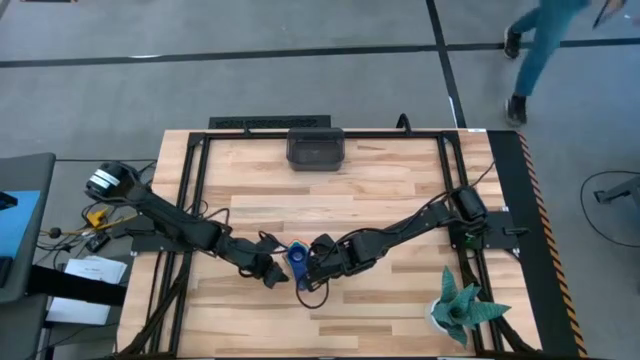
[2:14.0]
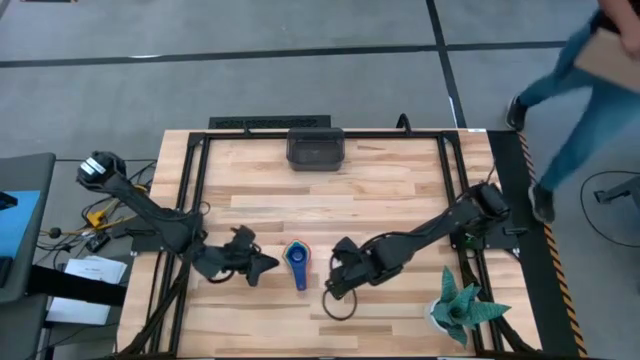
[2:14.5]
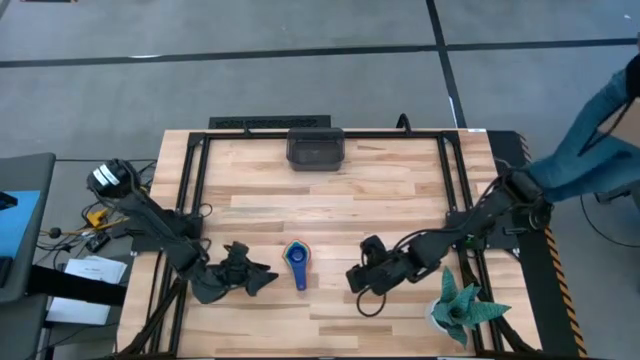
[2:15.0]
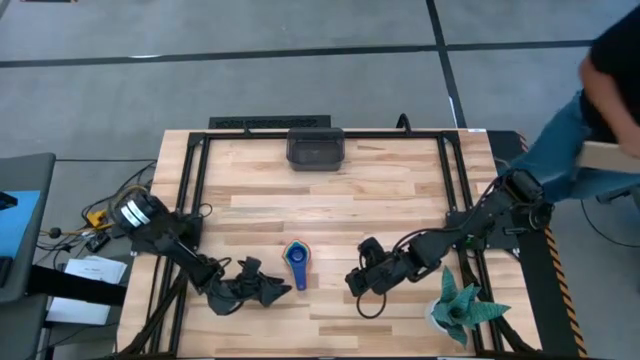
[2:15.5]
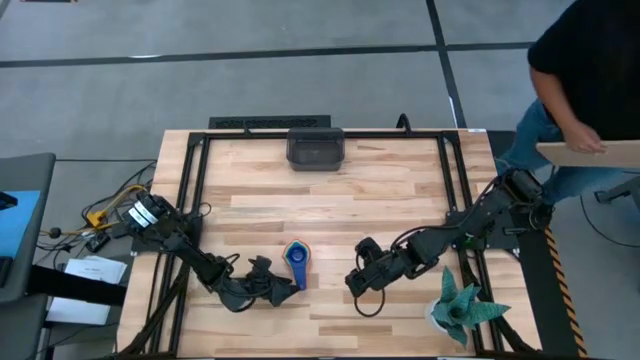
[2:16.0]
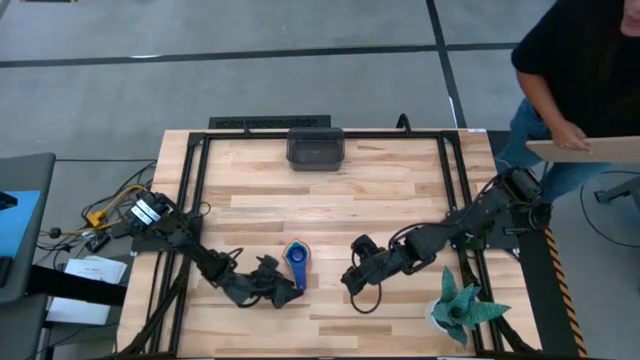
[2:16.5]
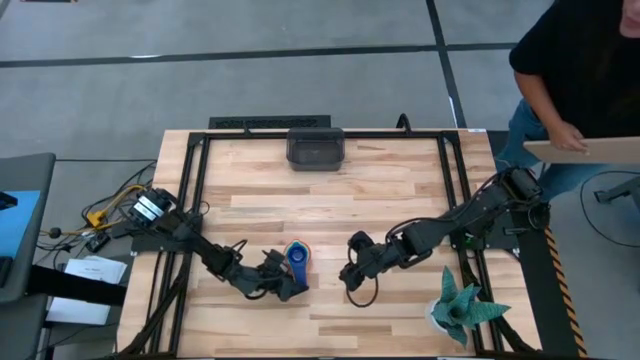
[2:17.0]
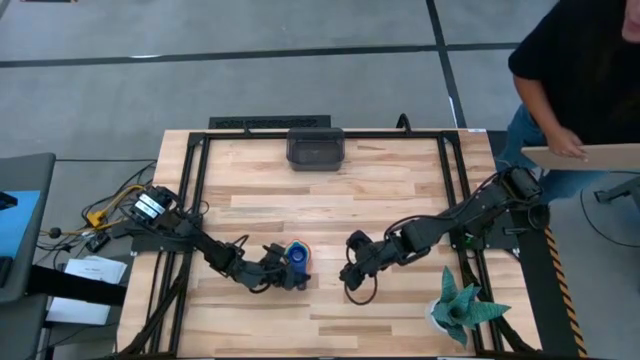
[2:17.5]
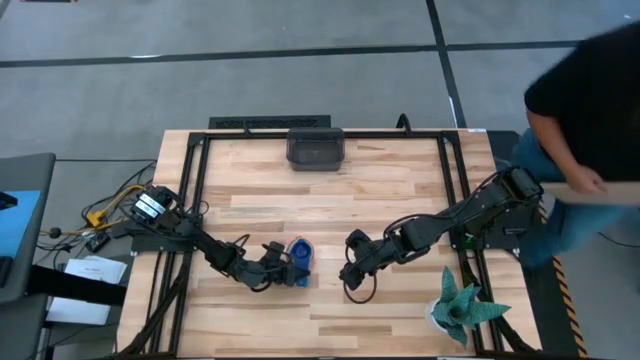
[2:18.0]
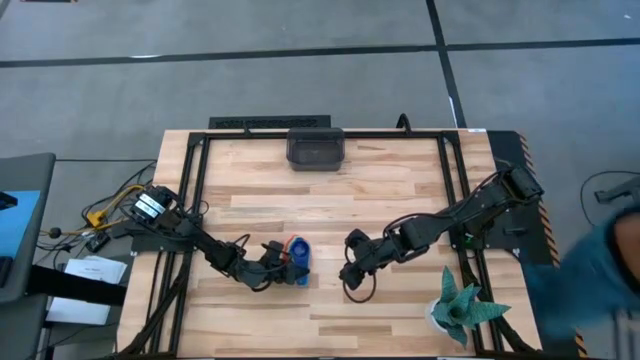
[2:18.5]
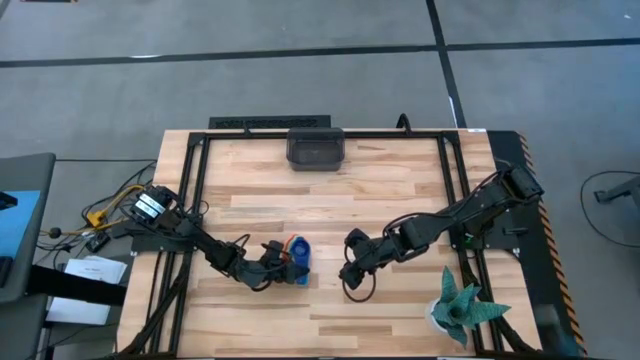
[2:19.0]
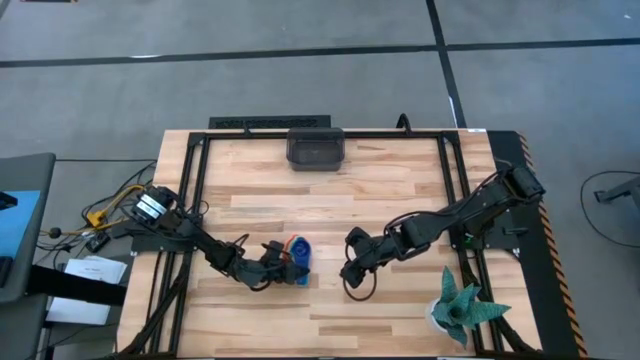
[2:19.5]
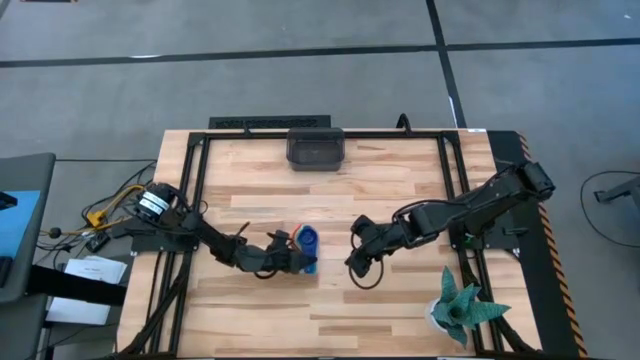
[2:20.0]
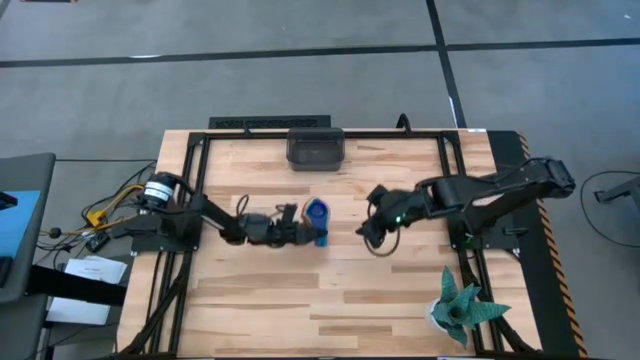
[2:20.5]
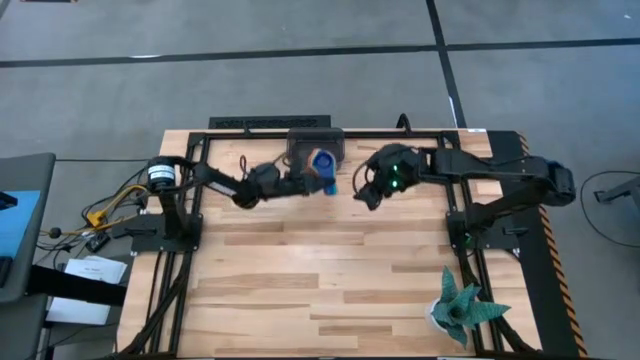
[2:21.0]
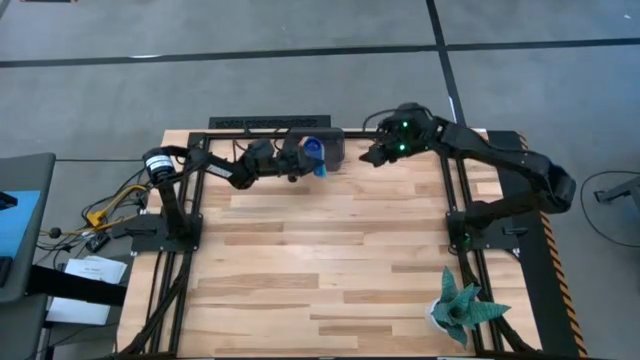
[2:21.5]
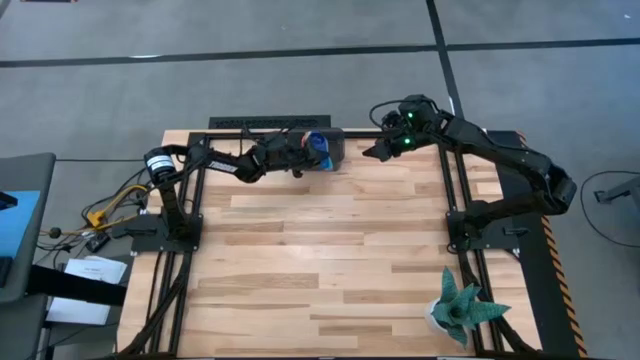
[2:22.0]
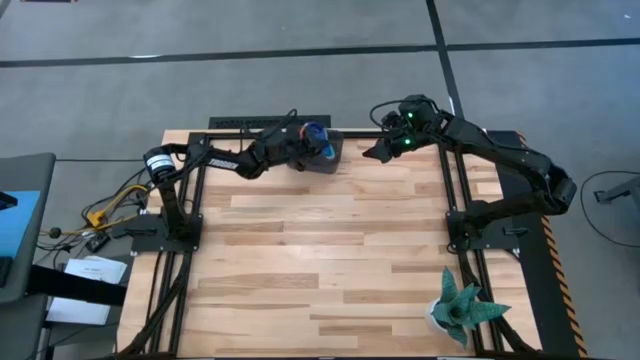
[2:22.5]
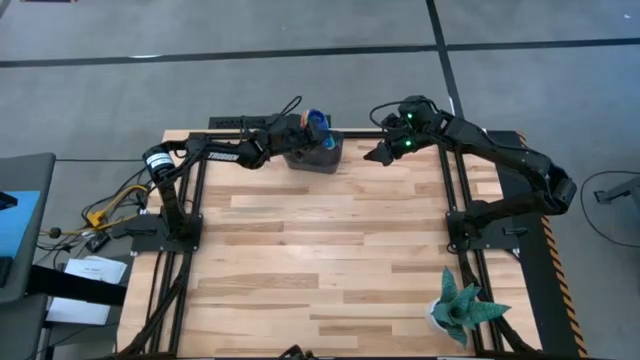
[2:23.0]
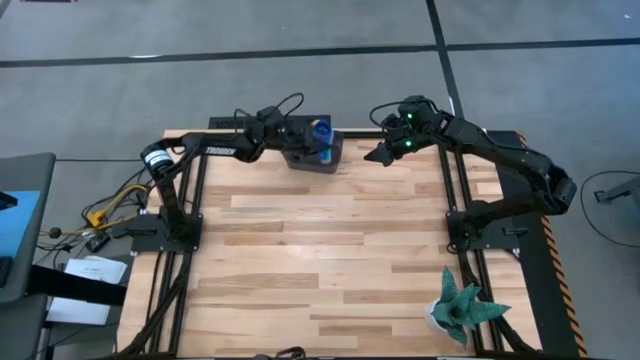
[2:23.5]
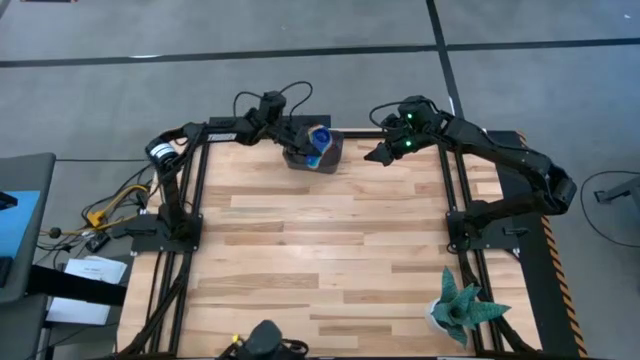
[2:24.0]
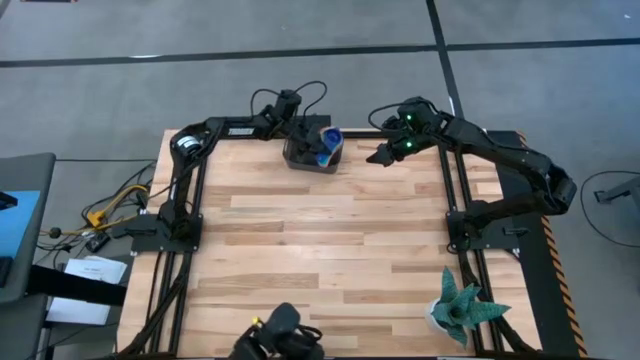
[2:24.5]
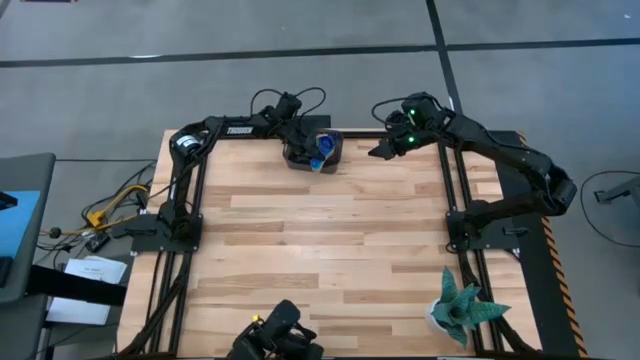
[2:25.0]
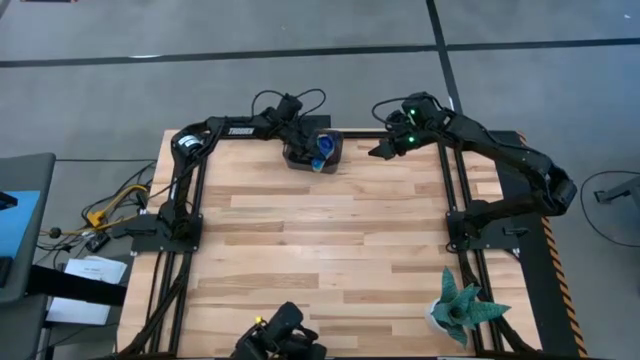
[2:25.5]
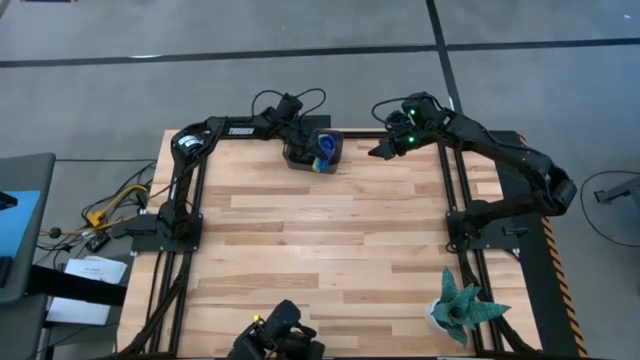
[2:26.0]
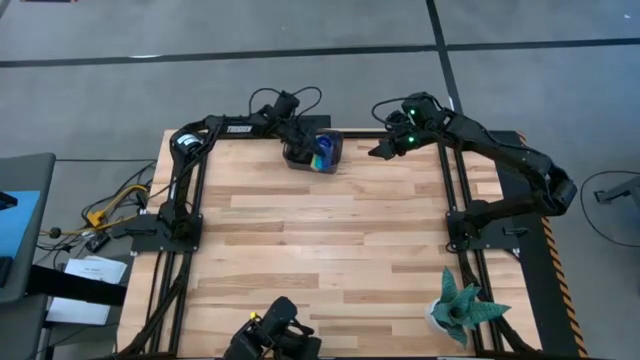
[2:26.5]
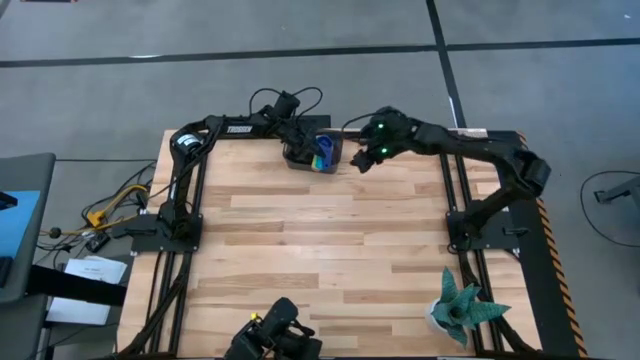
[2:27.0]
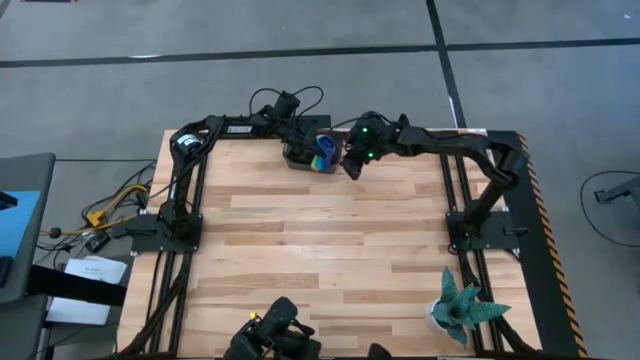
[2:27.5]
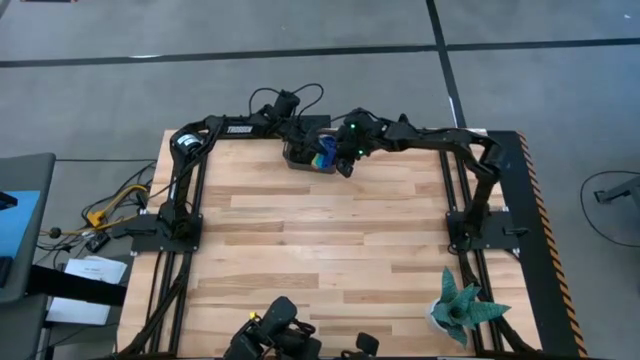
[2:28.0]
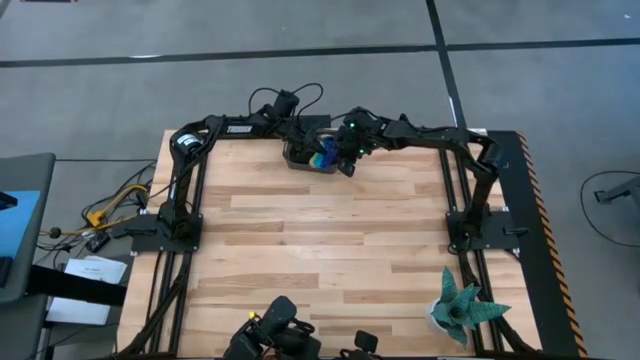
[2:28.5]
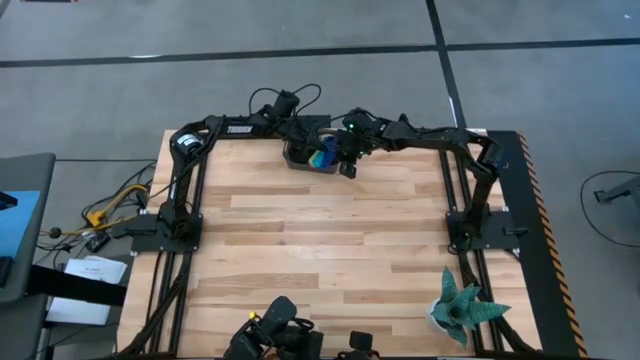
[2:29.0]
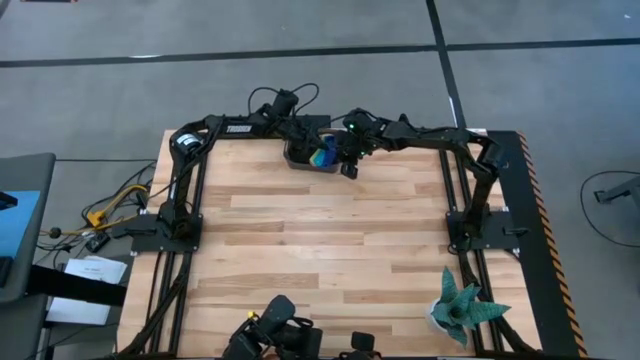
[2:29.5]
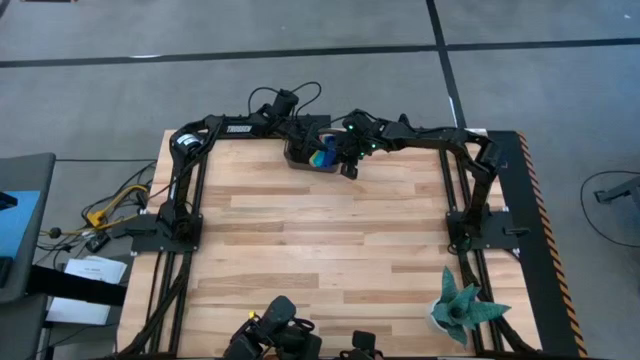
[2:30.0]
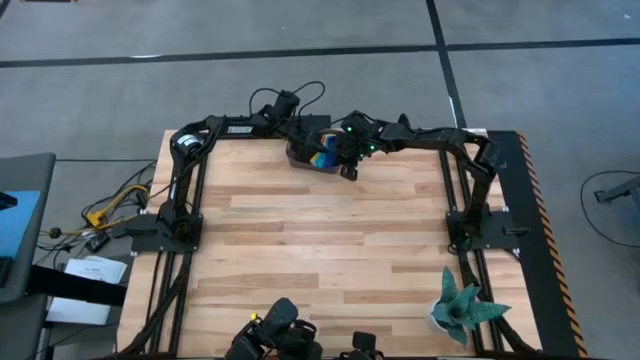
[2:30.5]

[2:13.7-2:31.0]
Task: Nest measuring cups in basket
Put the nested measuring cups into the black bin
